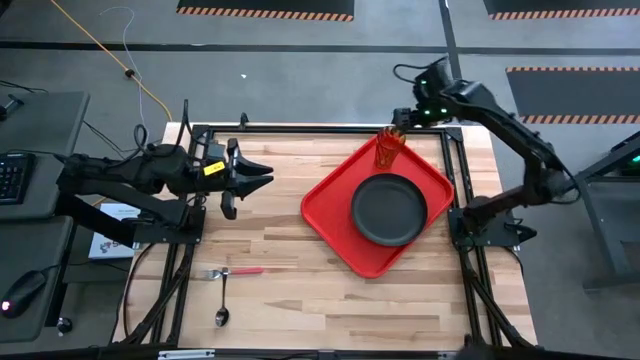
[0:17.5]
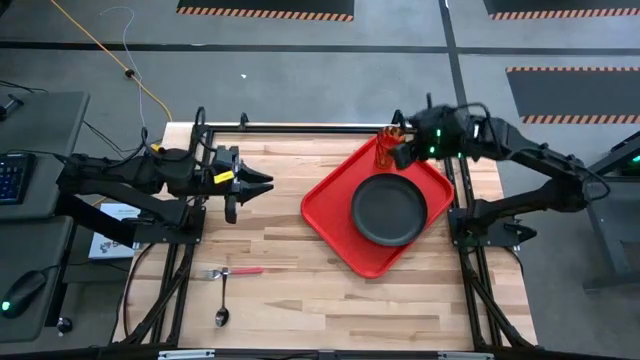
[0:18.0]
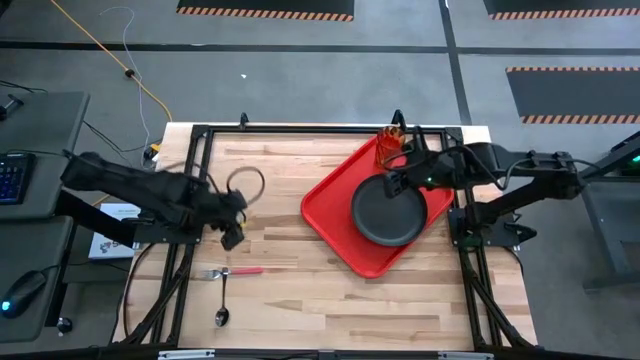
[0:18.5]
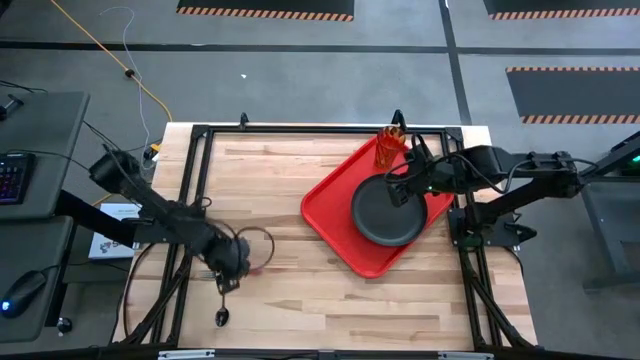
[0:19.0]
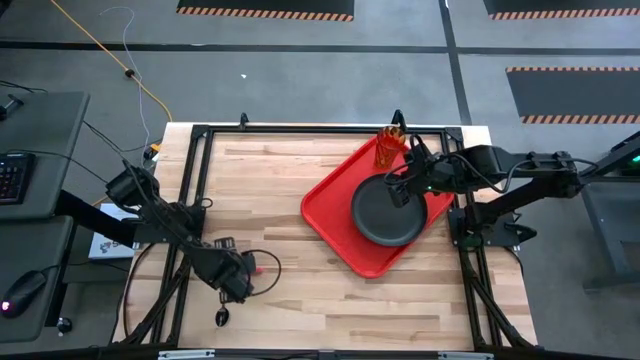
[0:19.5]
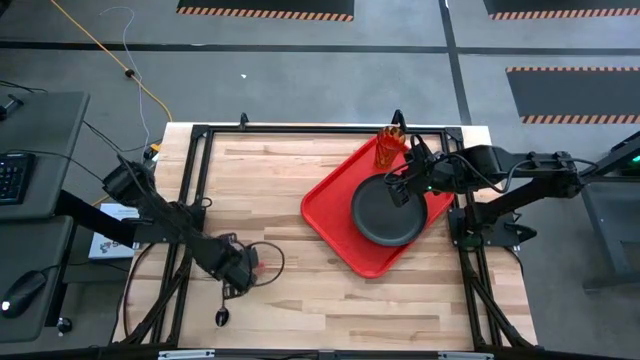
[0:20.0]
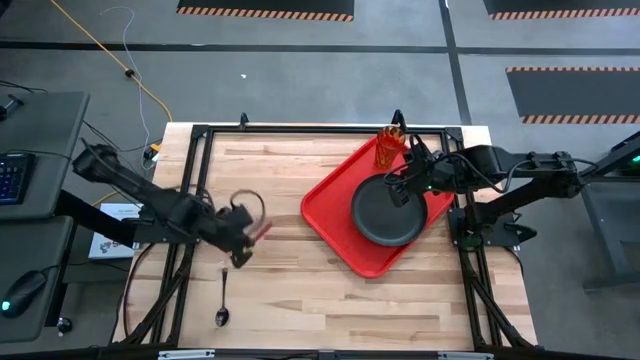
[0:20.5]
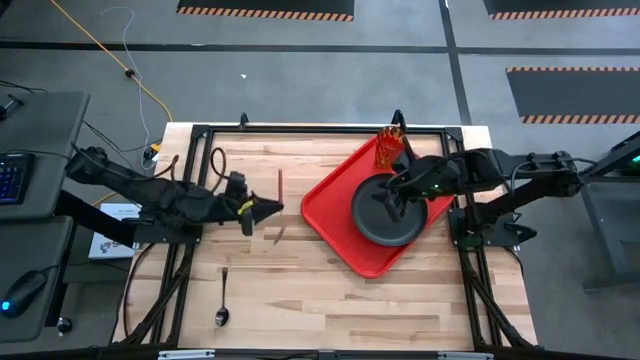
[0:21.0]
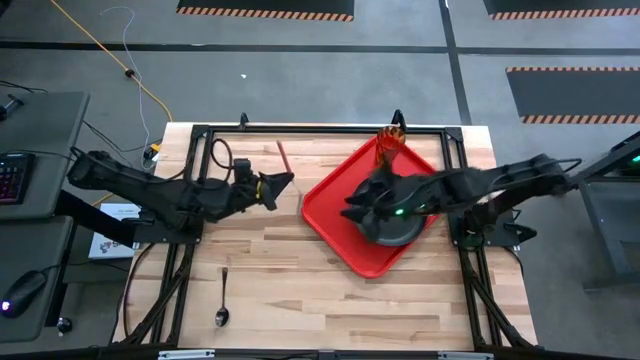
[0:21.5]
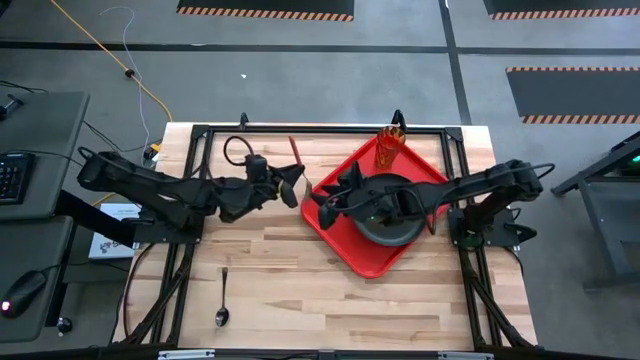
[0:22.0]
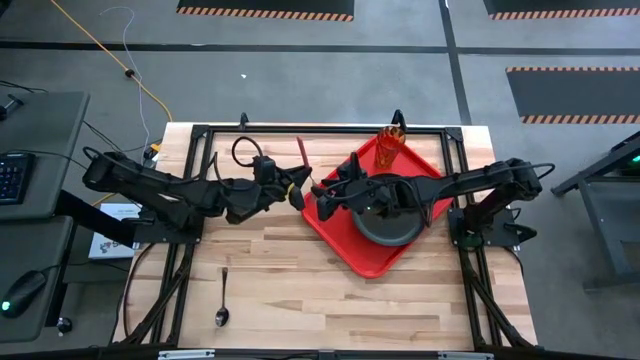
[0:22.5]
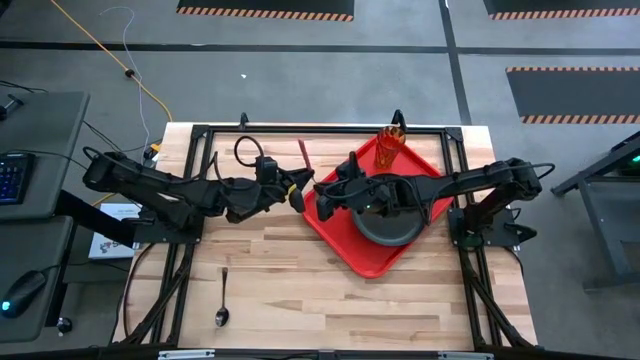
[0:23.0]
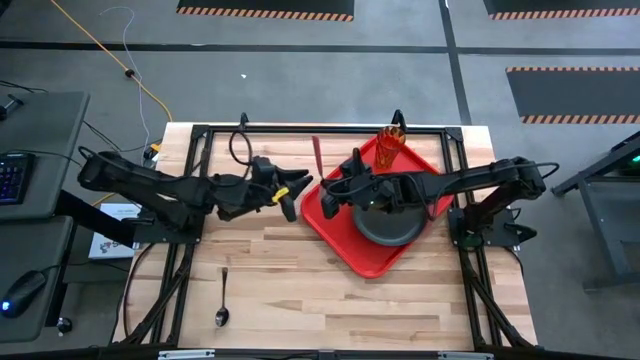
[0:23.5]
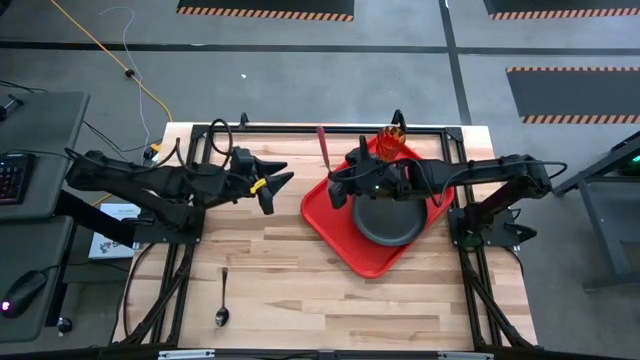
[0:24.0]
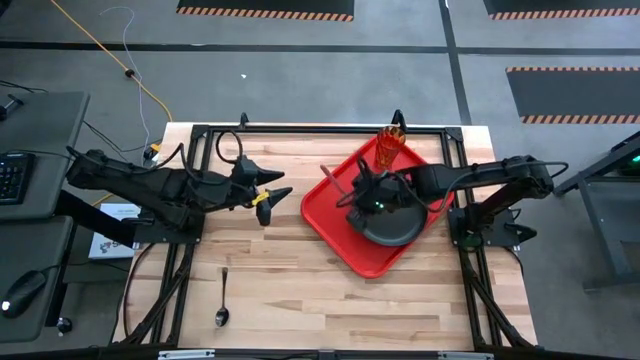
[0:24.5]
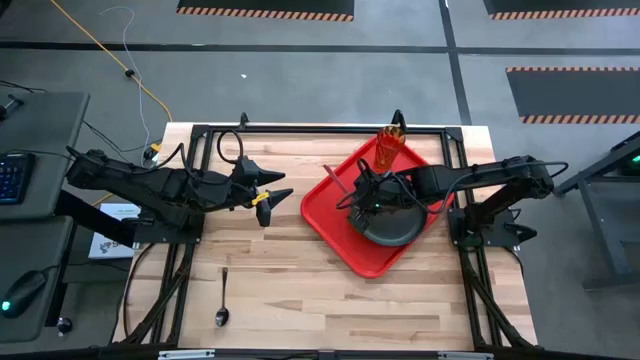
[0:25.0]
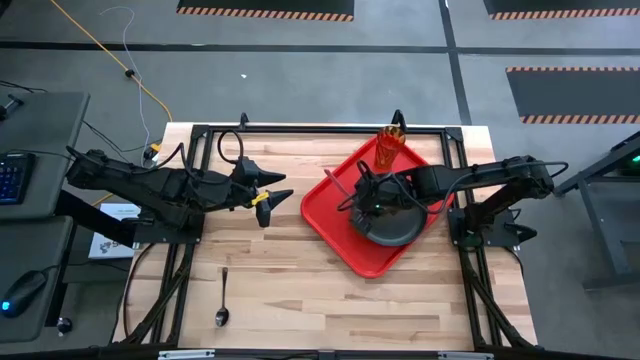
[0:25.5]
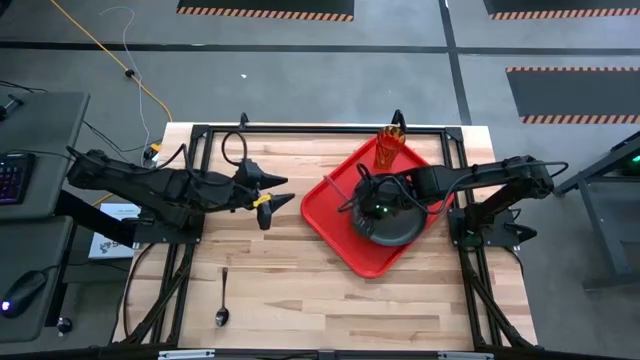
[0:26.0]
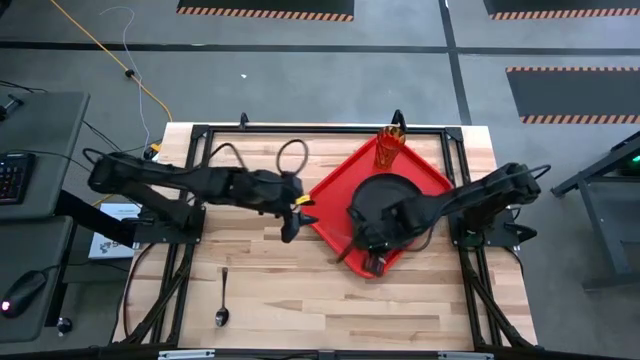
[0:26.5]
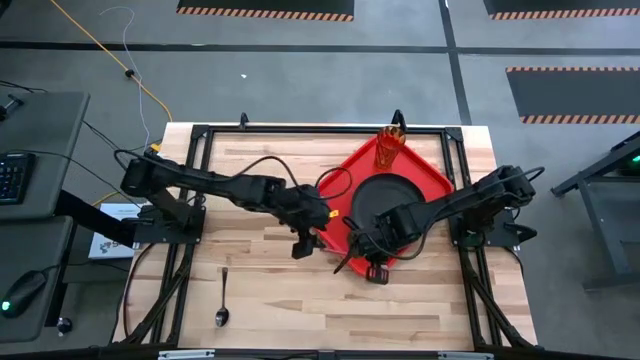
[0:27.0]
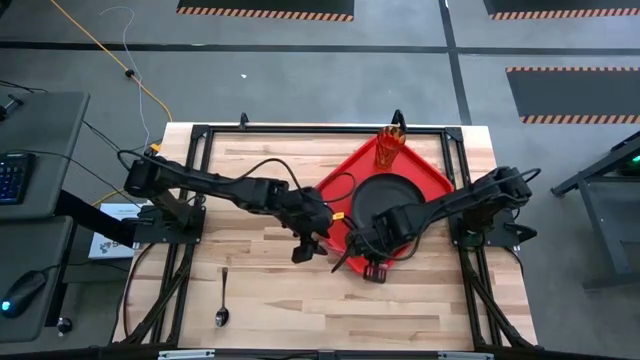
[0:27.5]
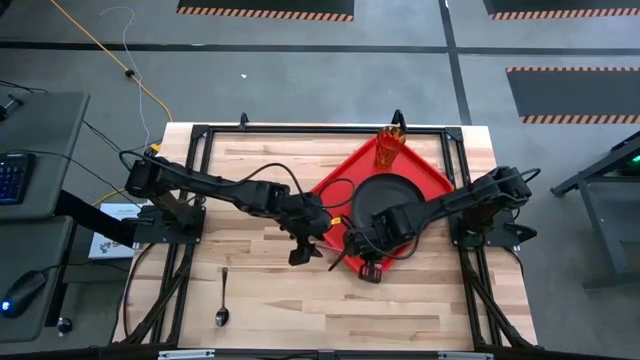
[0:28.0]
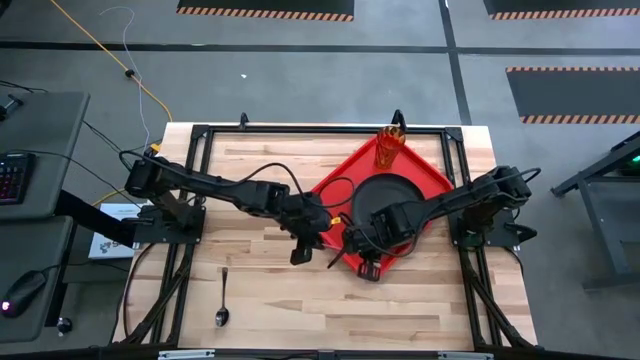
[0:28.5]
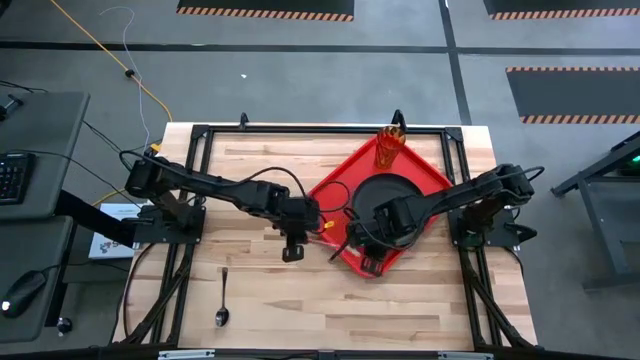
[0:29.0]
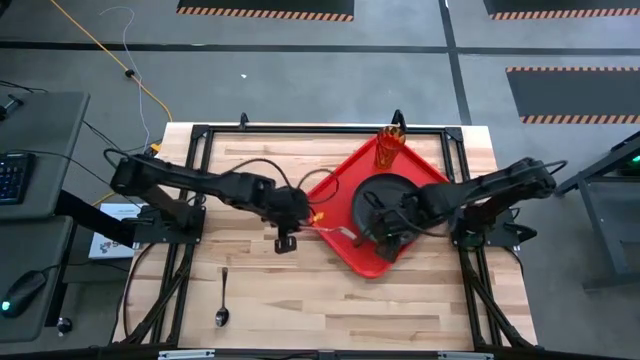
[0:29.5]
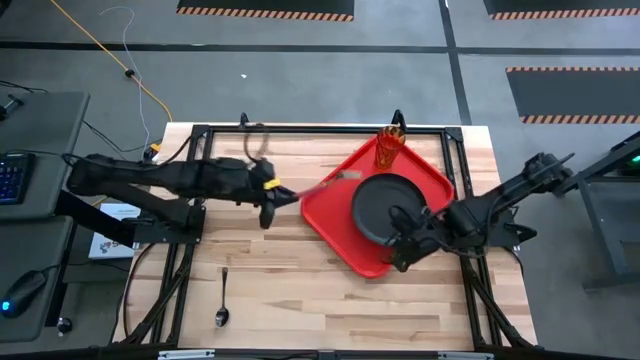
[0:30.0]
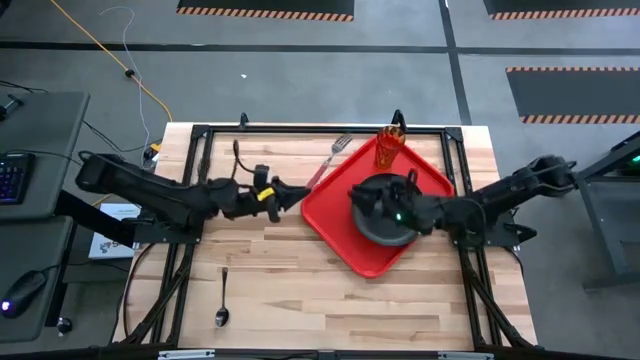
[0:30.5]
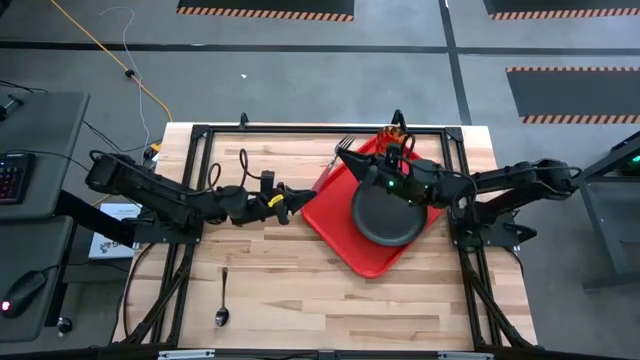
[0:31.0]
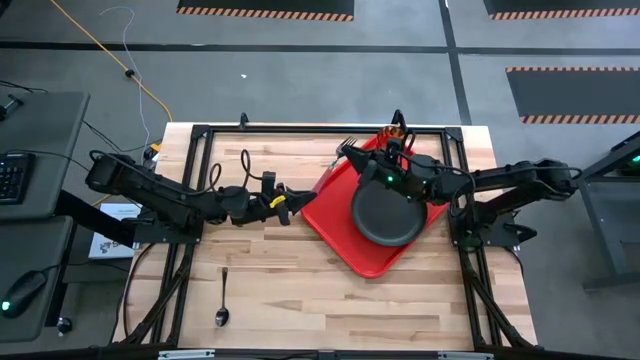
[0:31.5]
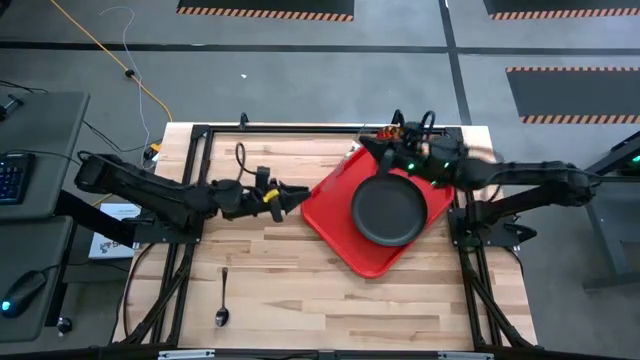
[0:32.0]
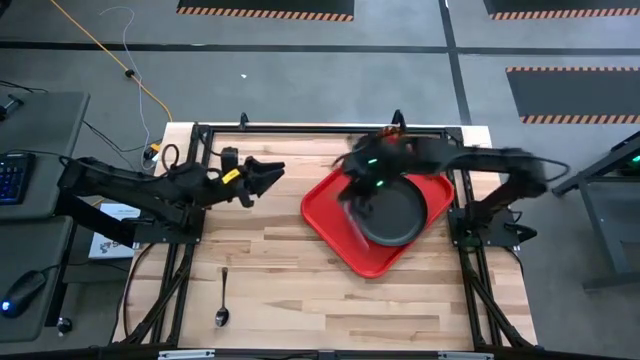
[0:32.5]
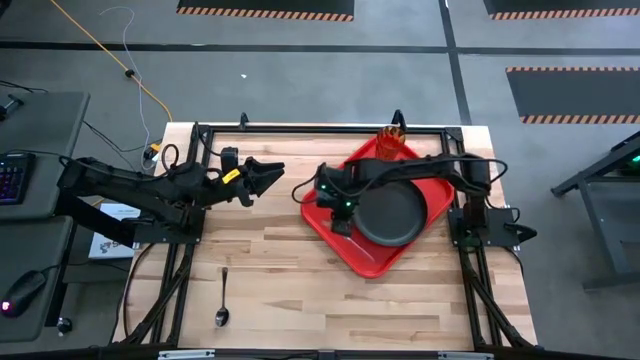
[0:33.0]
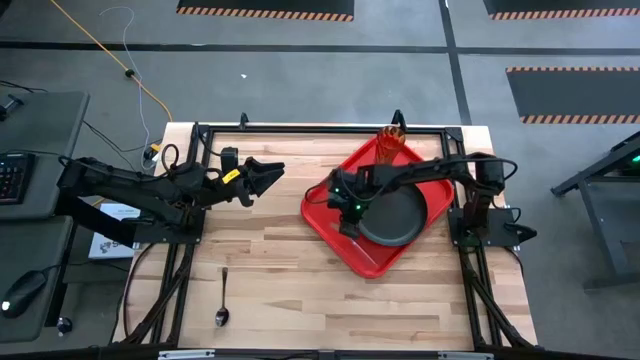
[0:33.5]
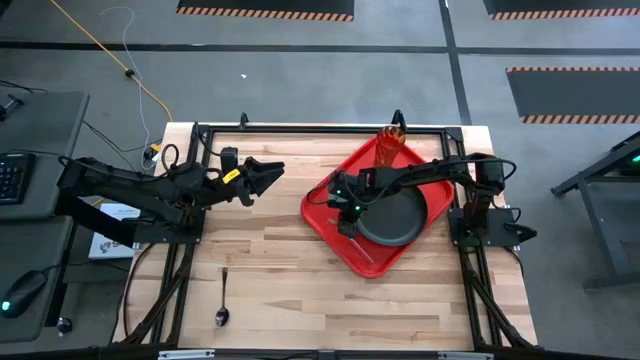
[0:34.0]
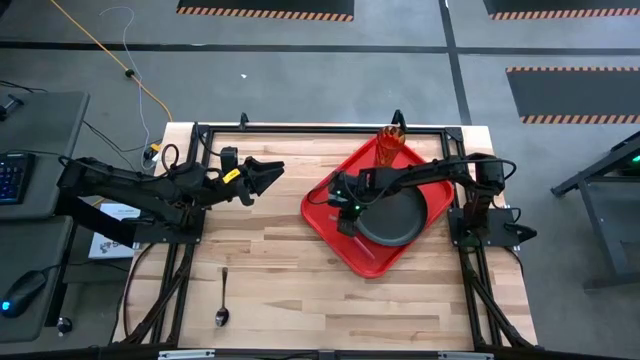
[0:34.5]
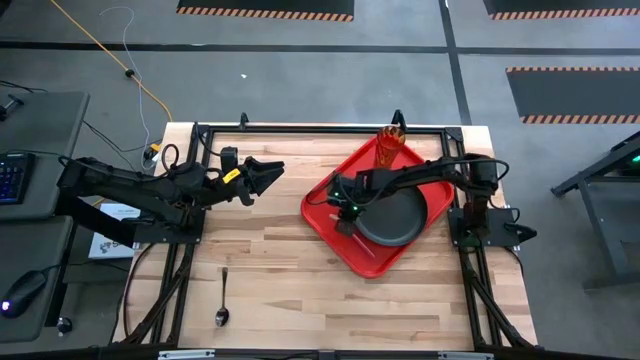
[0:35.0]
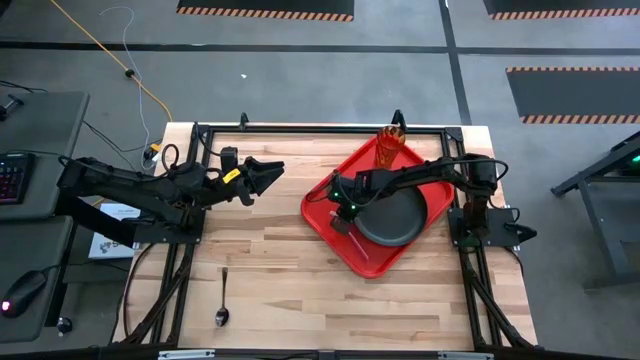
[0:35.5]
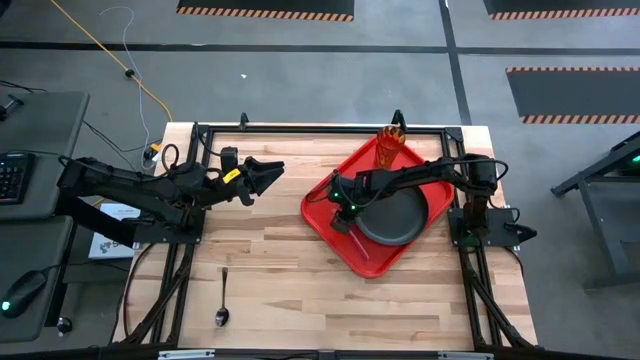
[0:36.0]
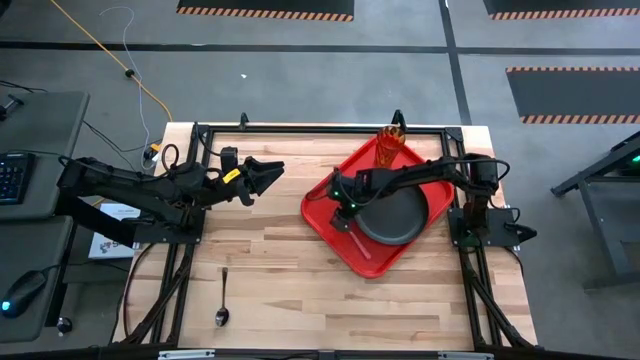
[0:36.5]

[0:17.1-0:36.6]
Task: Pick and place plate/cup/fork/spoon on tray
Put the pink fork on the red serving tray to the left of the black plate

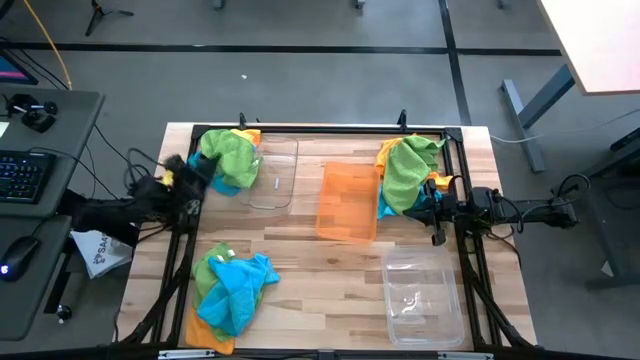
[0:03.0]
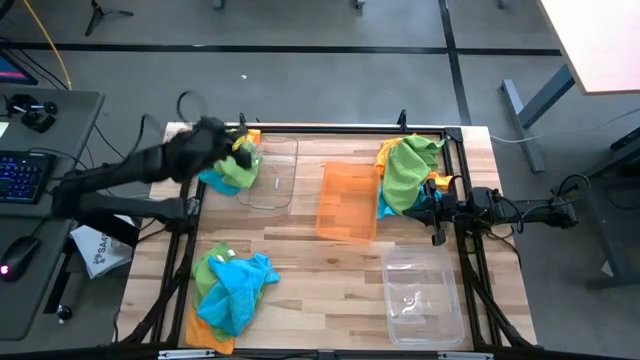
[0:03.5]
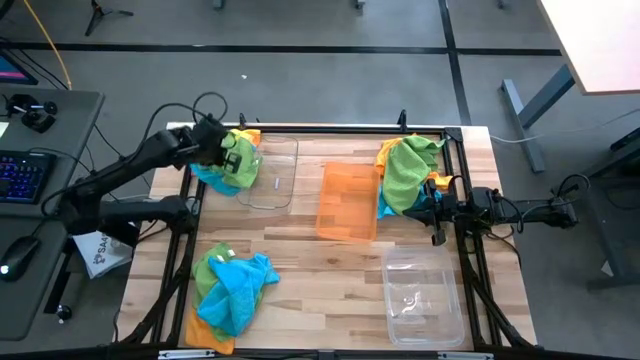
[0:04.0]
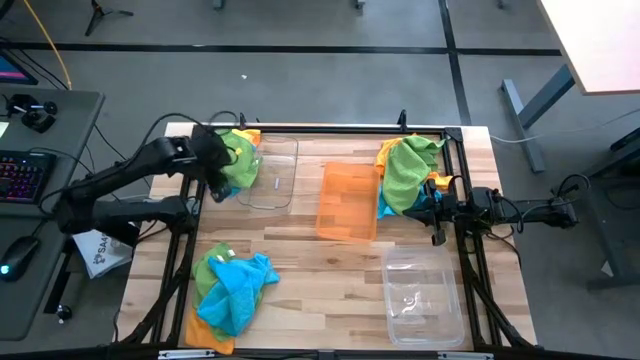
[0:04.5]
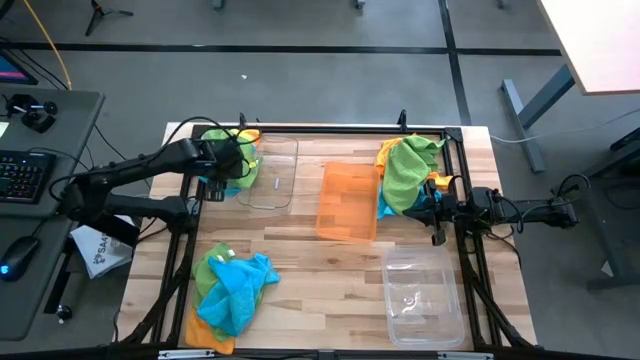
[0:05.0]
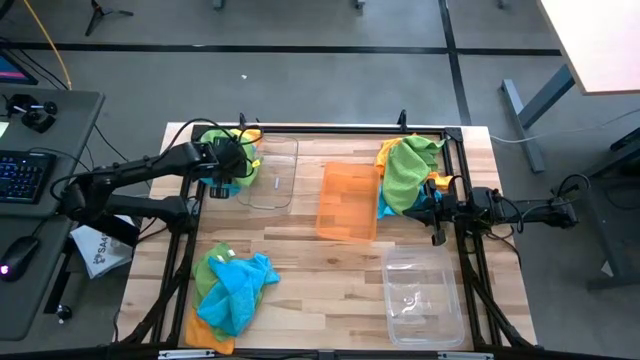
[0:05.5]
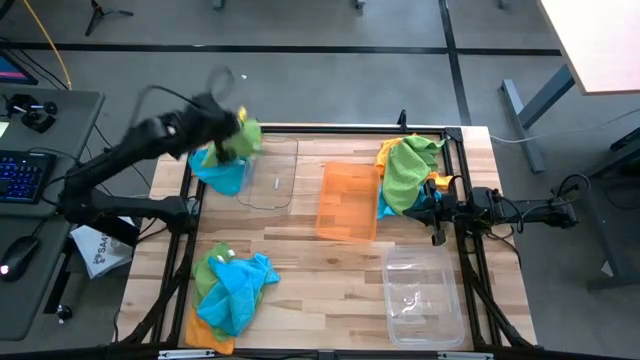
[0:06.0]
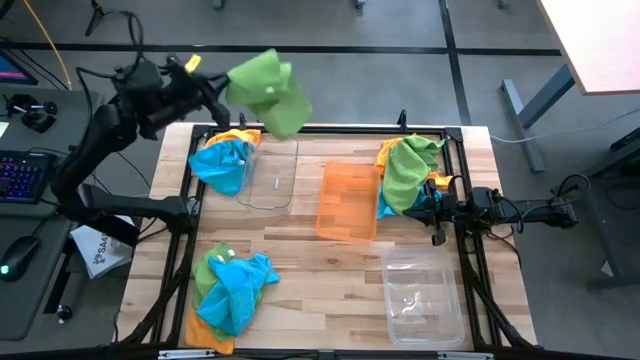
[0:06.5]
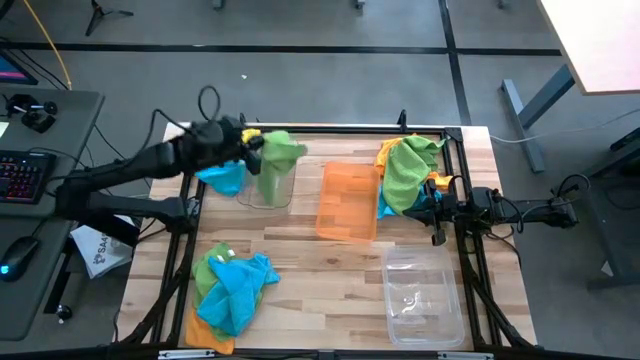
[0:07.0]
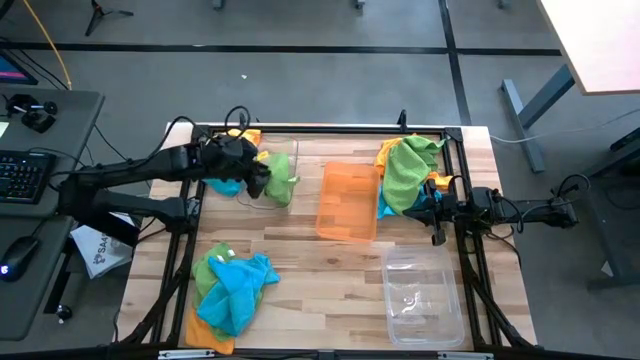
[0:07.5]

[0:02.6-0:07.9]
Task: Sort microfiber towel by color & place in baskets
Put the top left green microfiber cloth into the transparent bin
